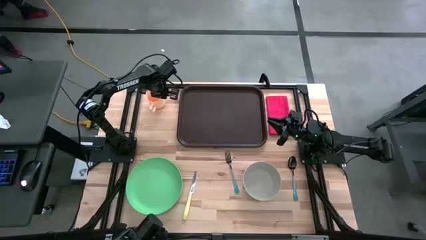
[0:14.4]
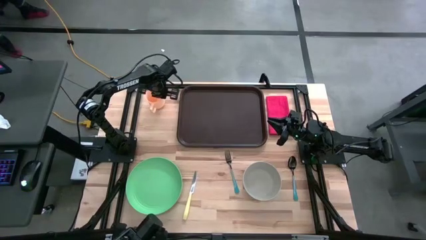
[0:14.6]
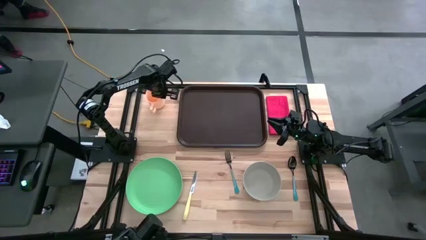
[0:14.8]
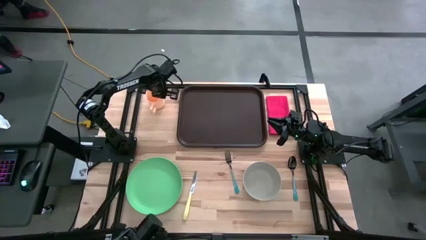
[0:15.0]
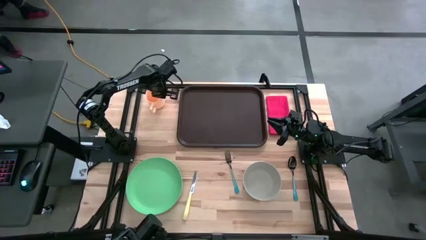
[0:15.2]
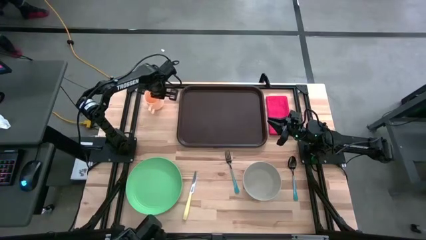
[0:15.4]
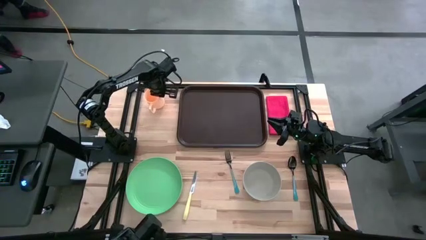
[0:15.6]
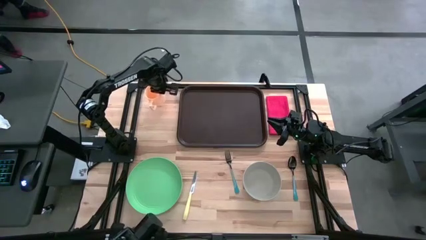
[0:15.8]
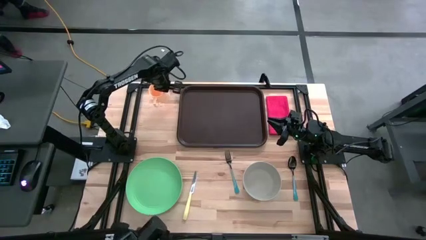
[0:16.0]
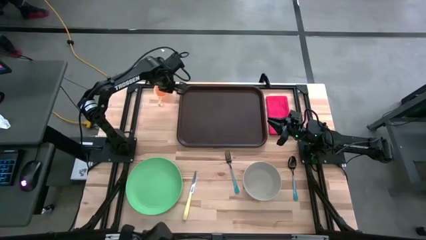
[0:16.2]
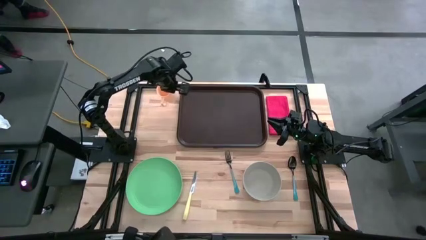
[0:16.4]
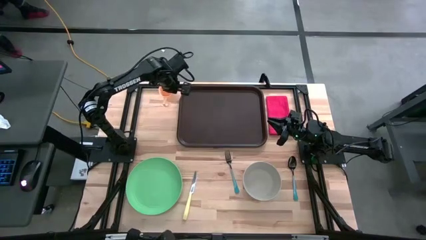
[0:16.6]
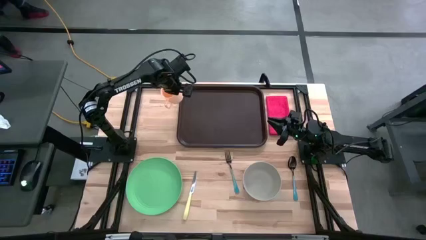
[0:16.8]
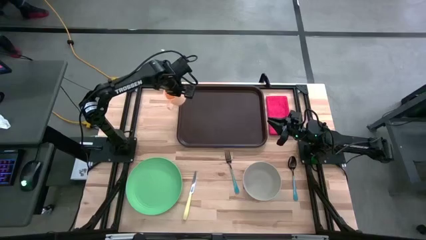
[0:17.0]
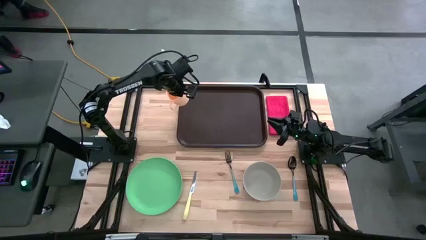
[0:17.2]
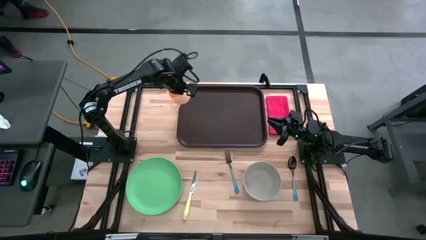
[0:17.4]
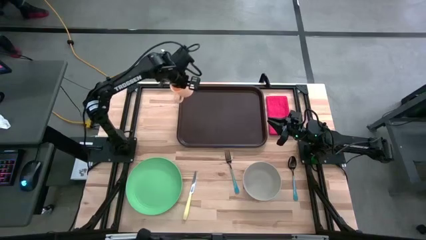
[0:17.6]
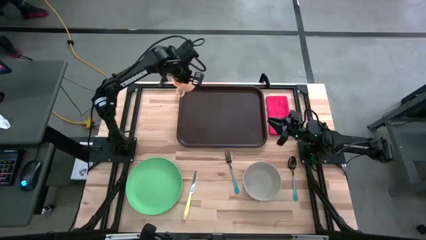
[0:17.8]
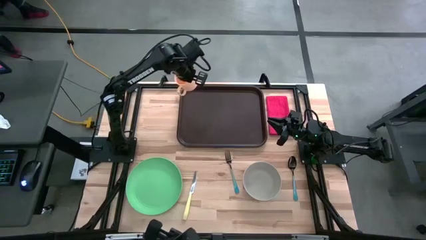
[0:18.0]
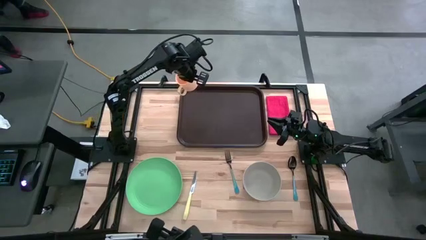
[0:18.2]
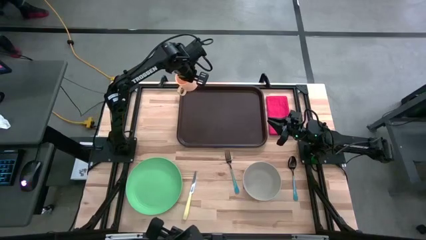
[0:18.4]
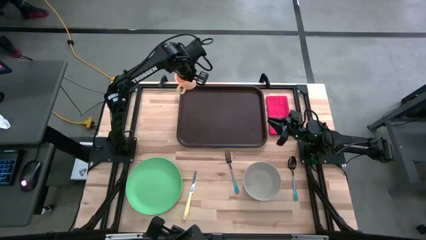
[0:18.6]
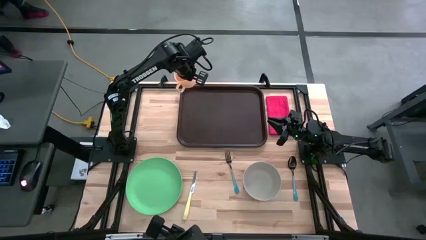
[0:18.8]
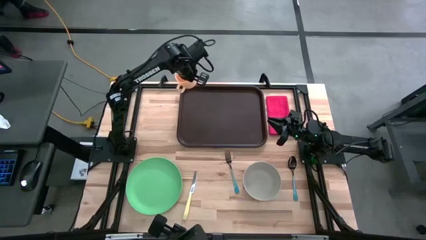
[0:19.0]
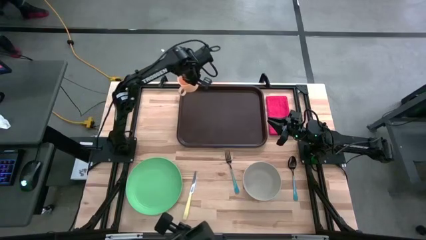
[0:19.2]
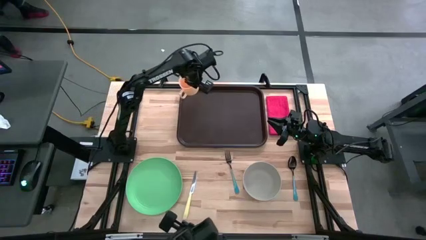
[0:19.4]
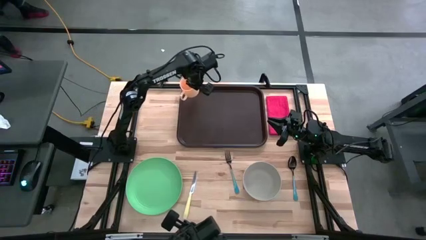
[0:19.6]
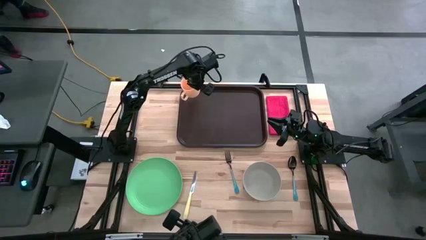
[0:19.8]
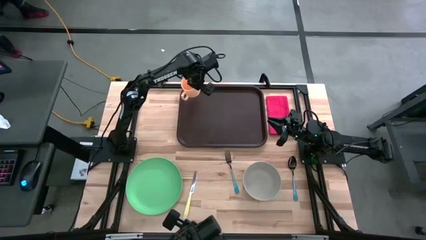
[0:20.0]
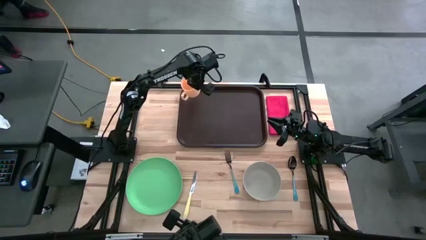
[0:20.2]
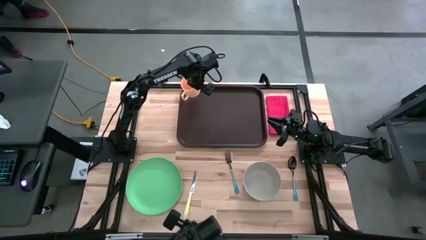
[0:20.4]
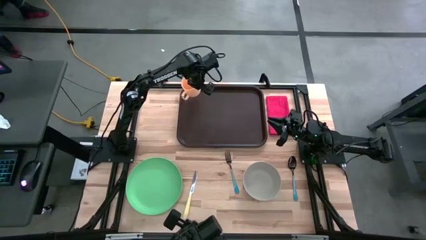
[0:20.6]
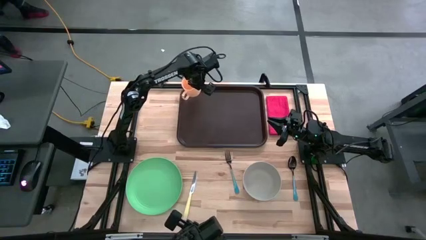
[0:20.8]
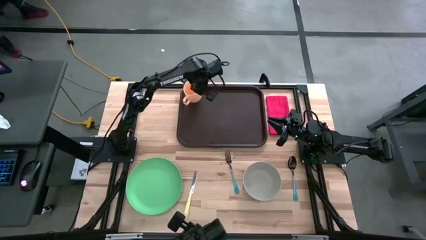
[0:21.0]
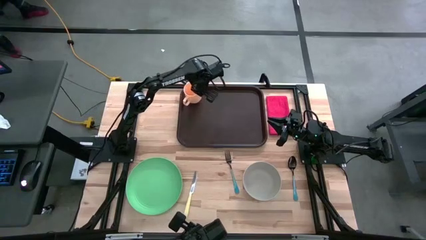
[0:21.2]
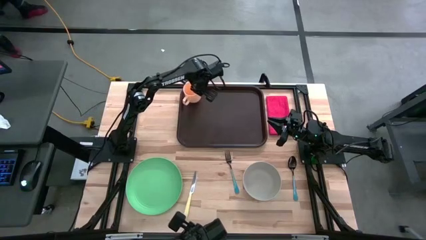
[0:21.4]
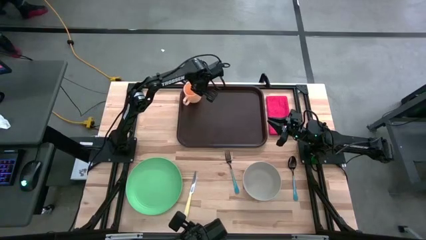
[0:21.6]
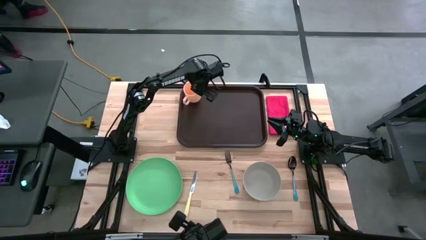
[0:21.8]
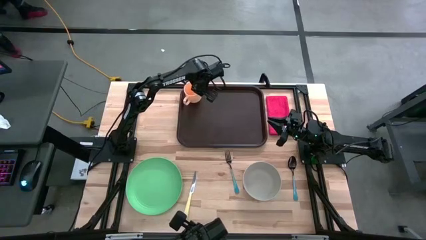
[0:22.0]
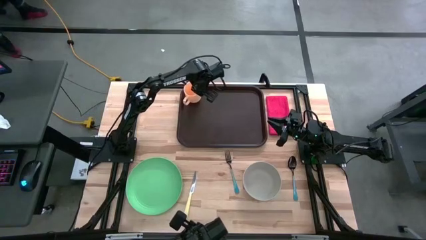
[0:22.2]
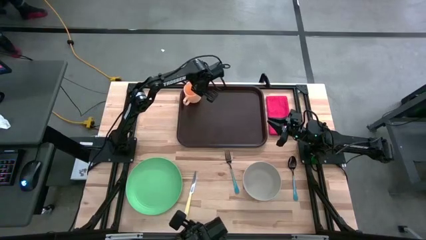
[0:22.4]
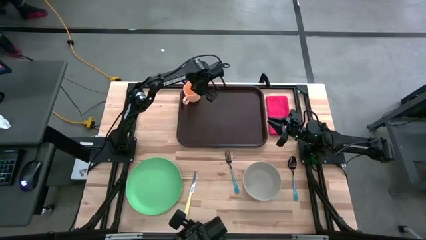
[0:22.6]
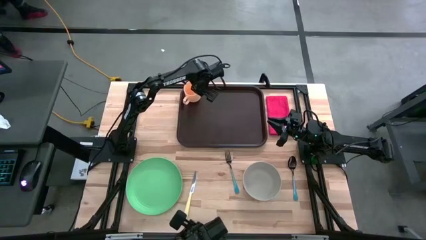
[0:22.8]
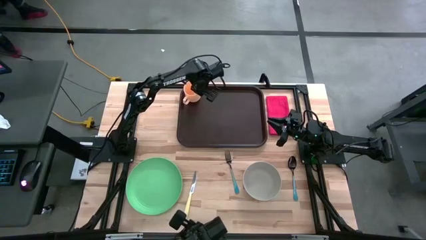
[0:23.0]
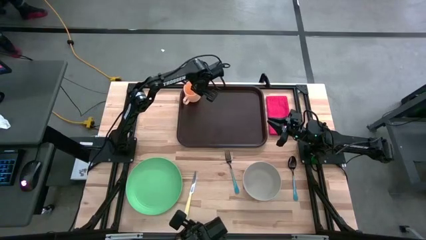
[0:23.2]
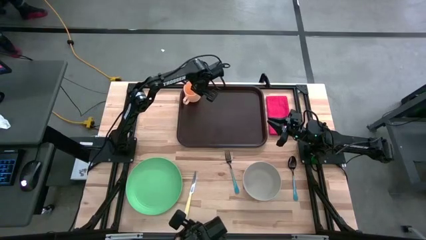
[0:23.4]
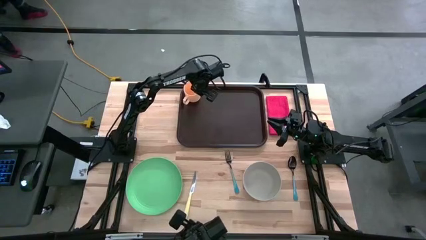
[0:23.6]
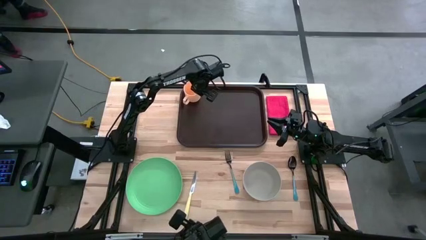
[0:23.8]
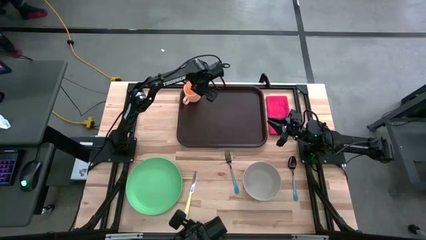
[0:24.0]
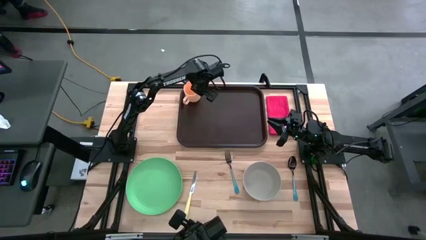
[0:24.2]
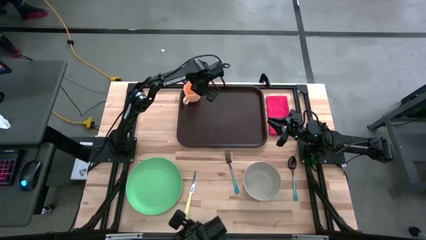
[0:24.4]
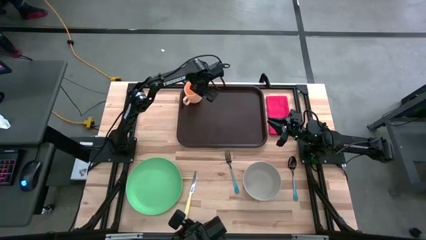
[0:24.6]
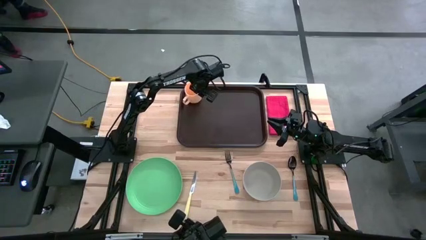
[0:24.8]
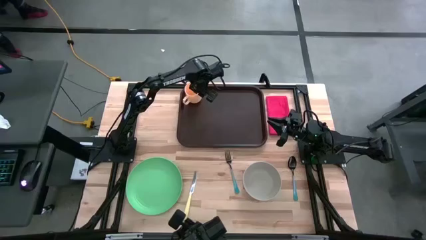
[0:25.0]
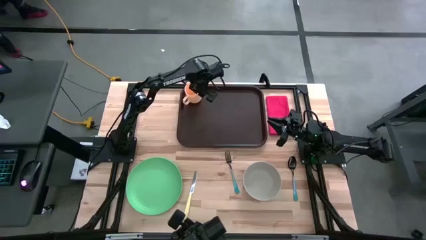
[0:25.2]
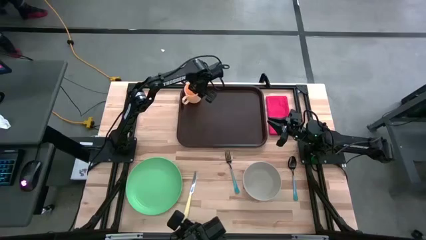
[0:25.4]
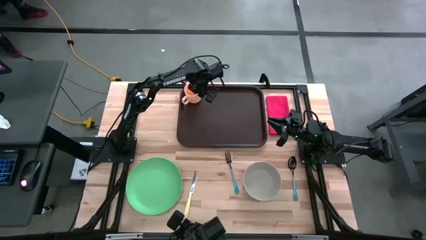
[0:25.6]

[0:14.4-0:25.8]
Task: Set up tray
Put the yellow mug on the brown serving tray
